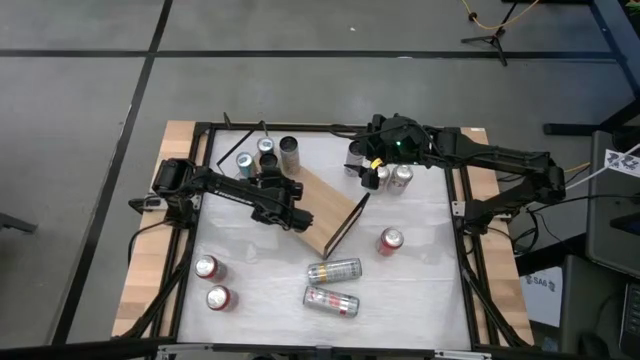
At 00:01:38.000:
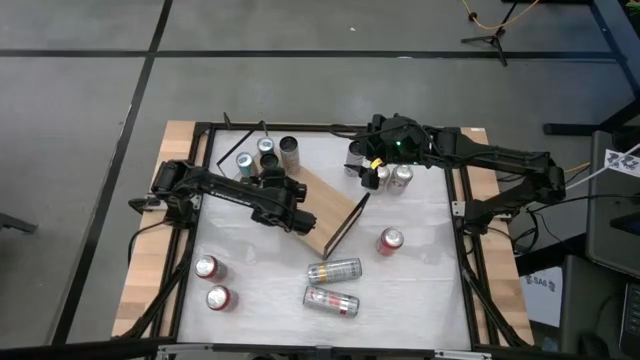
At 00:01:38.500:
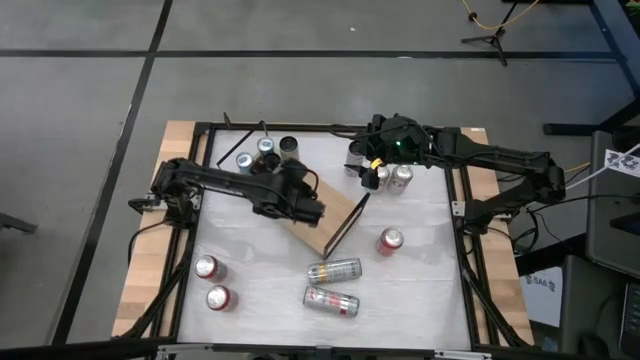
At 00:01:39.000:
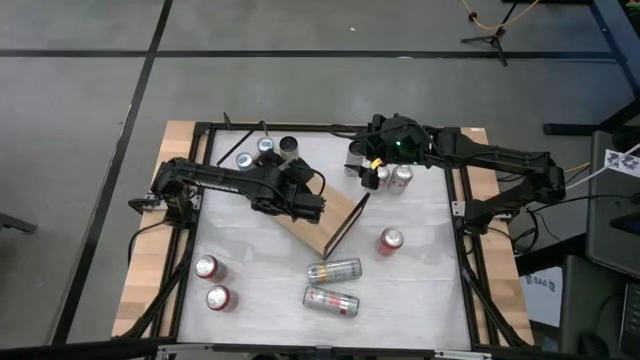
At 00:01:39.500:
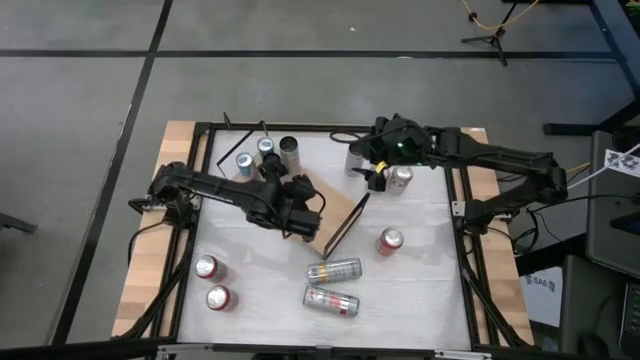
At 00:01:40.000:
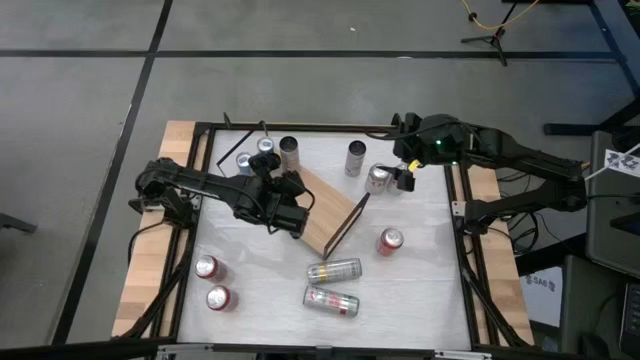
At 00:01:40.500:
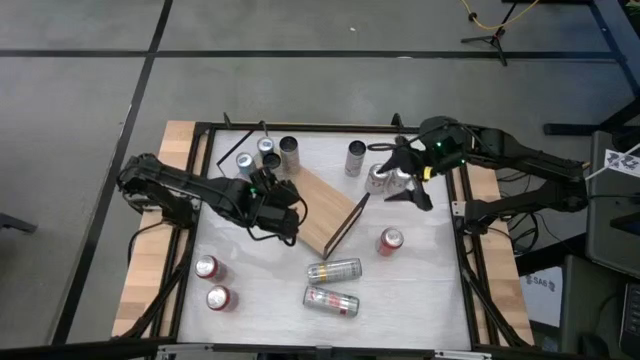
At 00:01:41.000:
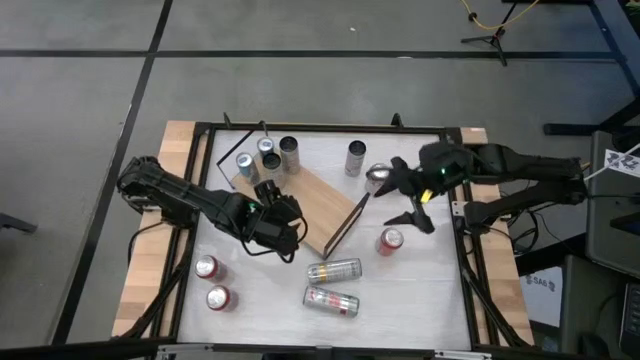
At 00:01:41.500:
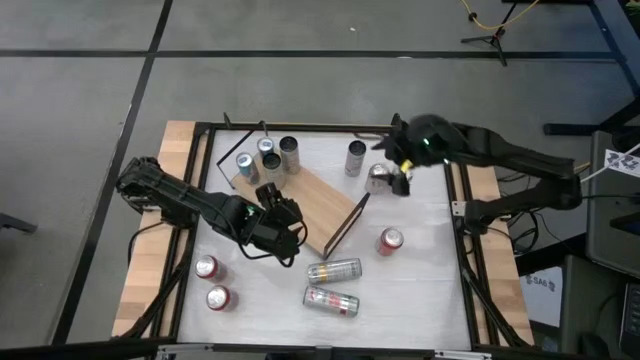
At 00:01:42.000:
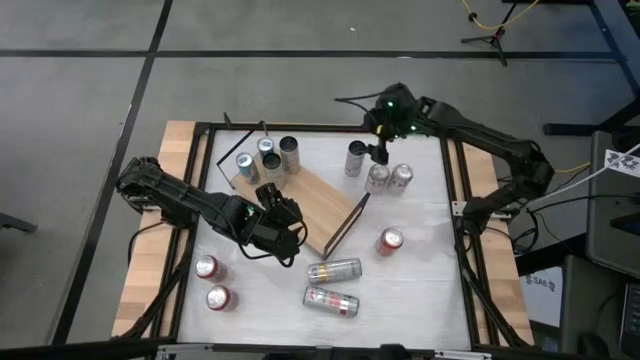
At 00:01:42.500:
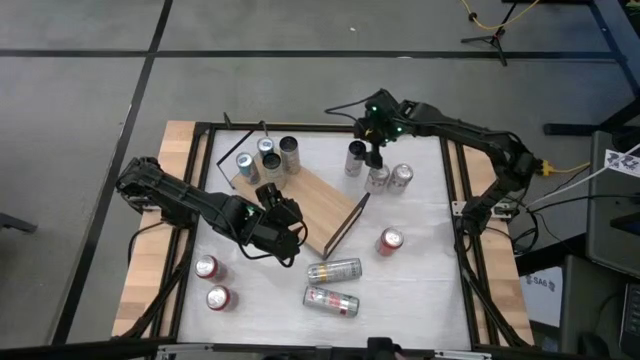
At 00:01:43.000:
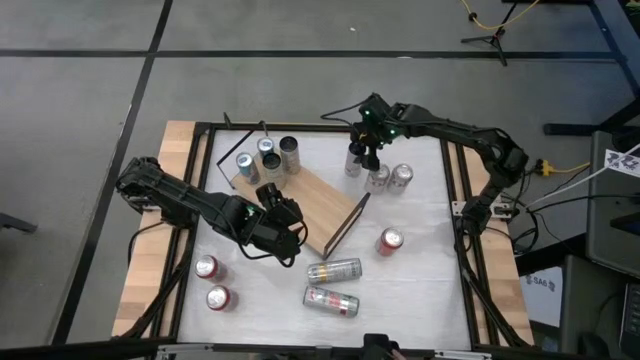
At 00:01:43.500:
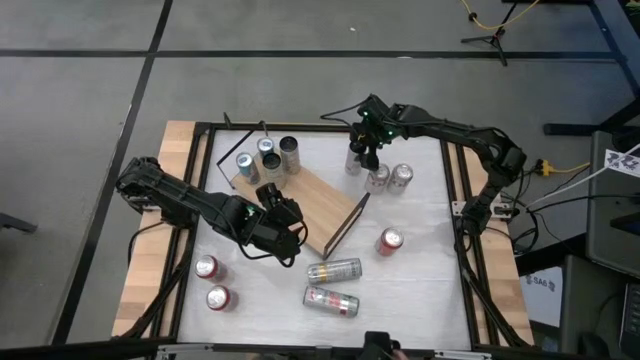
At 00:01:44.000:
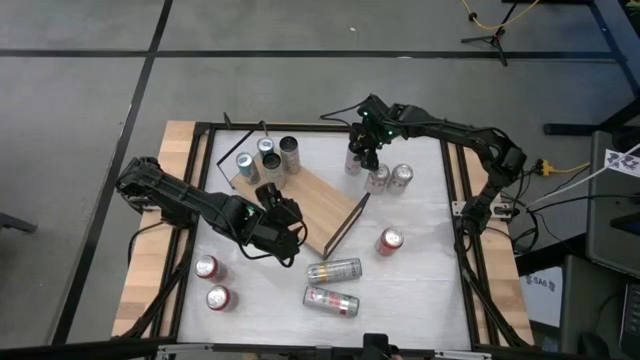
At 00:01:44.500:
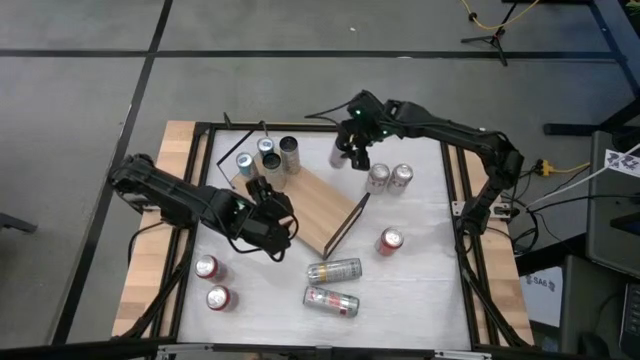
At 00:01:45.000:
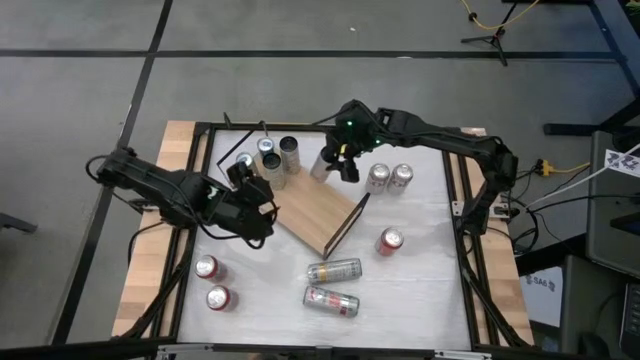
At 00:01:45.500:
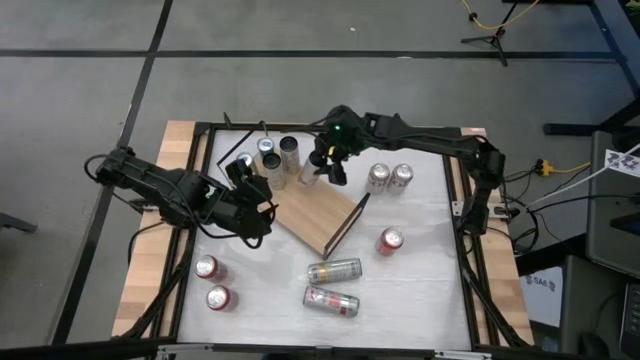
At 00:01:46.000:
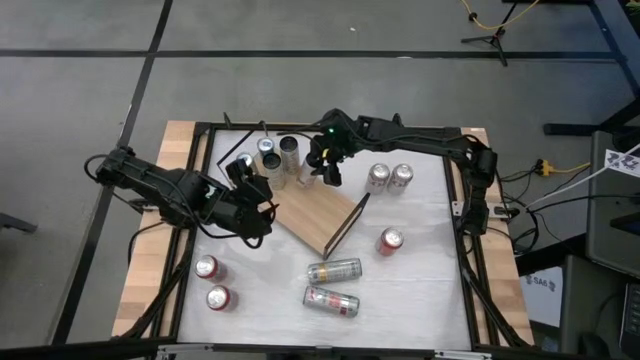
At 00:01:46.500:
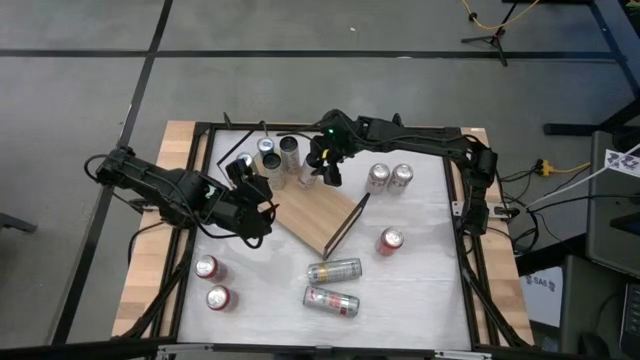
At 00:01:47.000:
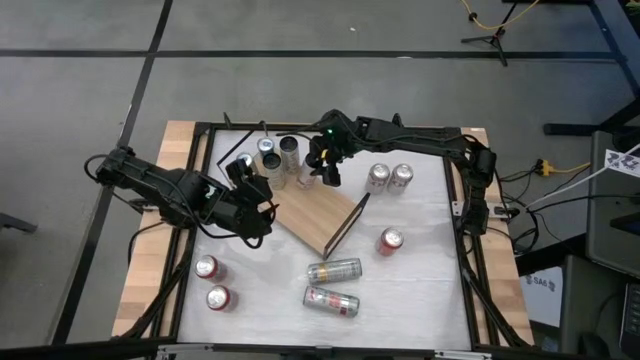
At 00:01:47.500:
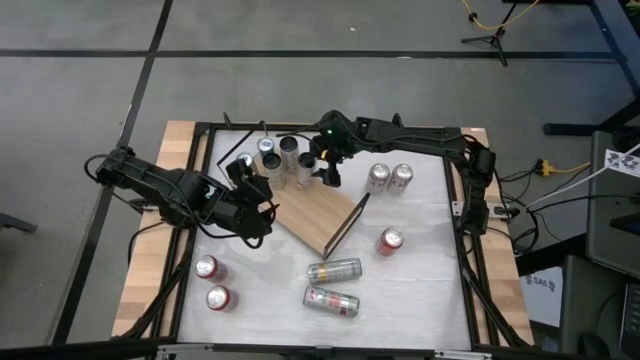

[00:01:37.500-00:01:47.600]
Task: Place canned beverage on shelf
Put the top white-pink soda can on the shelf

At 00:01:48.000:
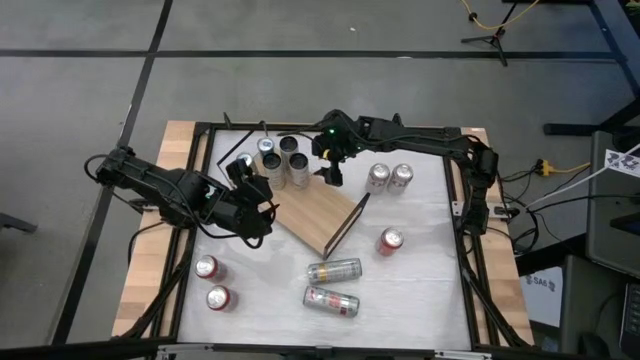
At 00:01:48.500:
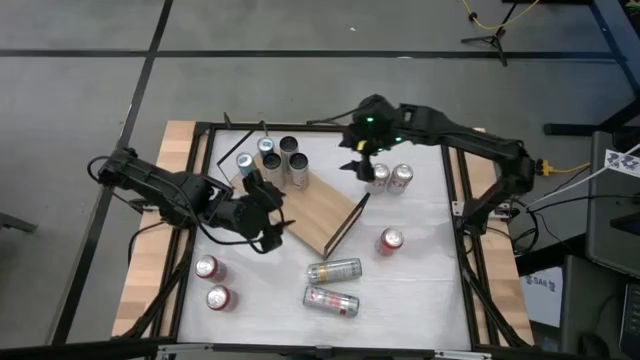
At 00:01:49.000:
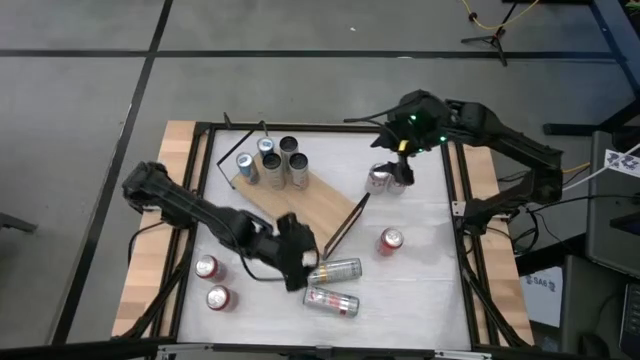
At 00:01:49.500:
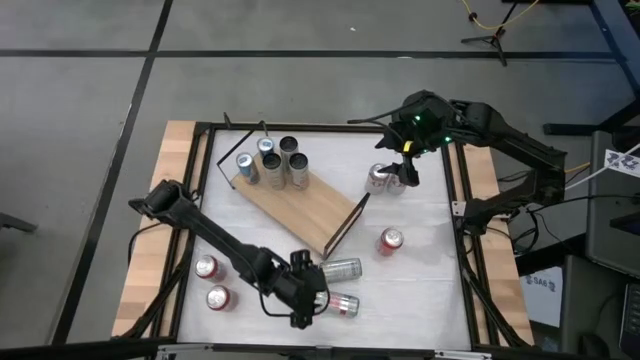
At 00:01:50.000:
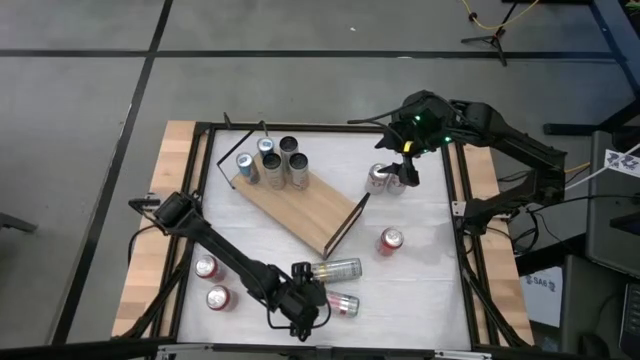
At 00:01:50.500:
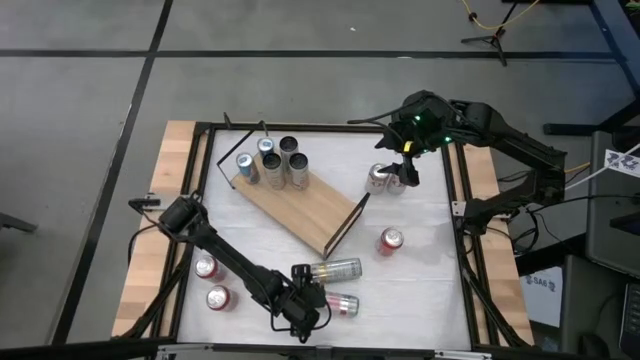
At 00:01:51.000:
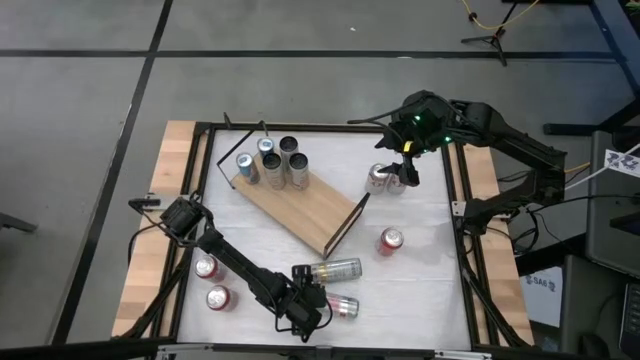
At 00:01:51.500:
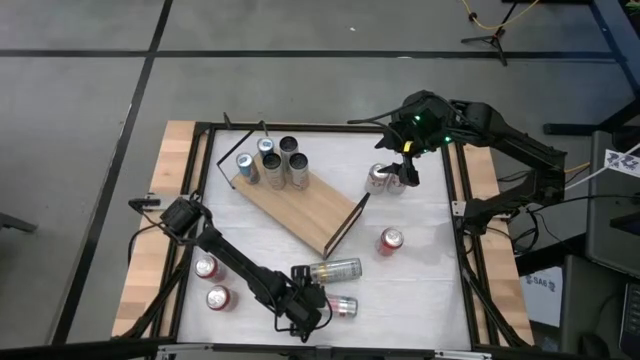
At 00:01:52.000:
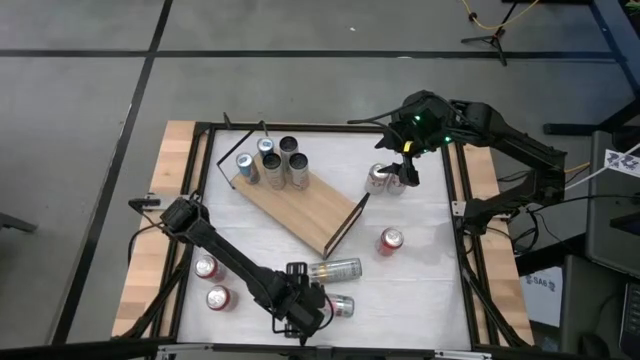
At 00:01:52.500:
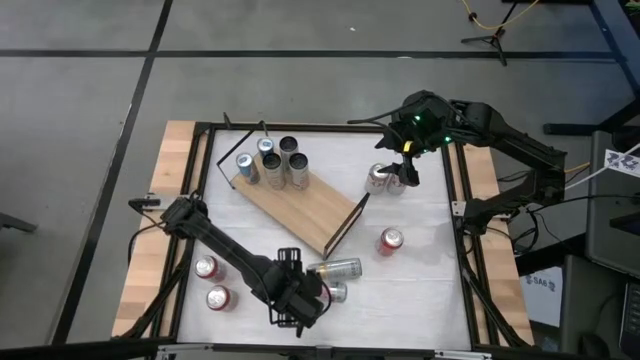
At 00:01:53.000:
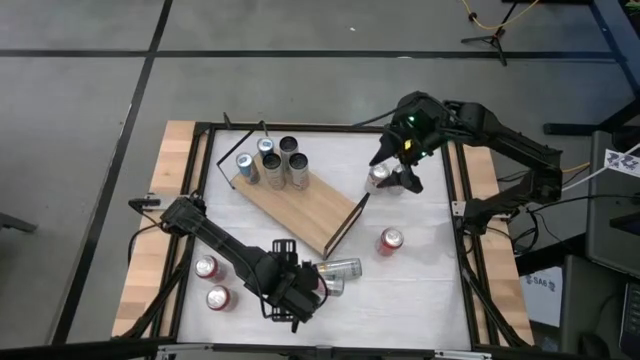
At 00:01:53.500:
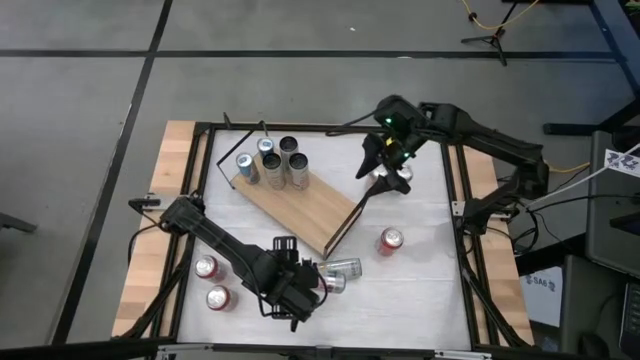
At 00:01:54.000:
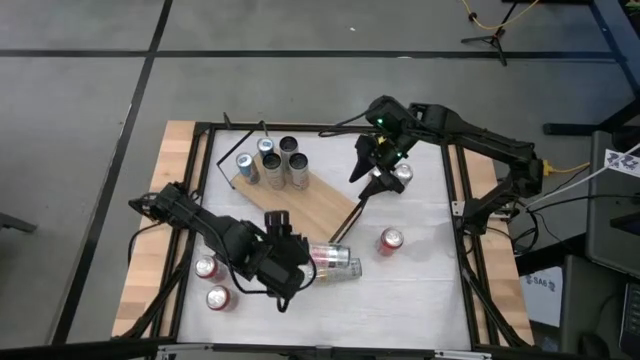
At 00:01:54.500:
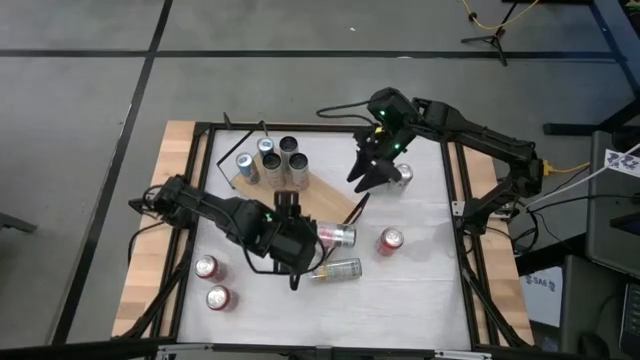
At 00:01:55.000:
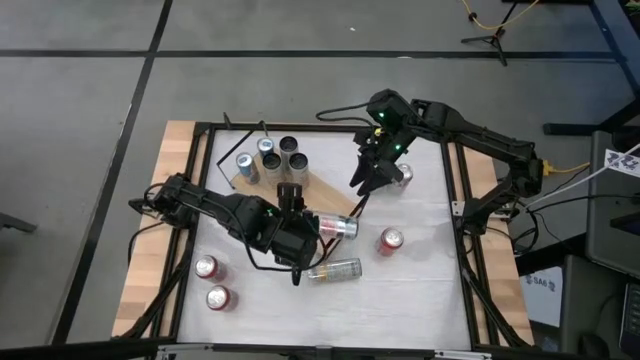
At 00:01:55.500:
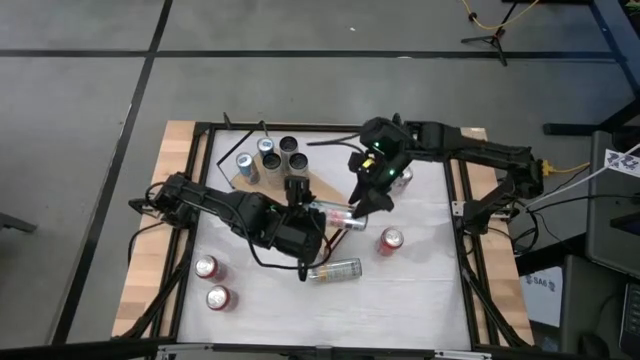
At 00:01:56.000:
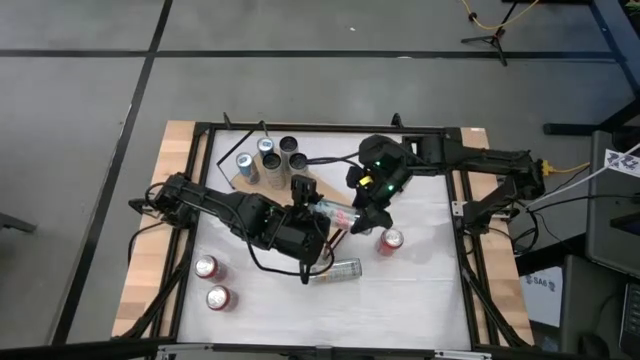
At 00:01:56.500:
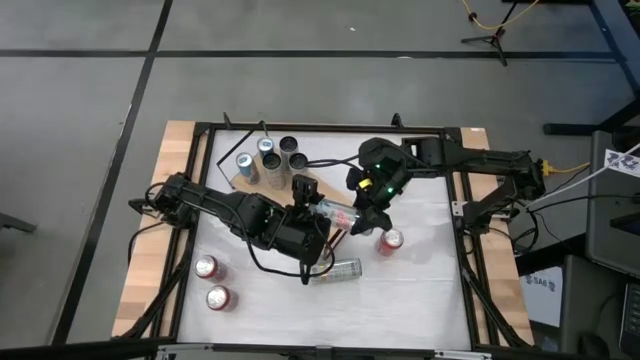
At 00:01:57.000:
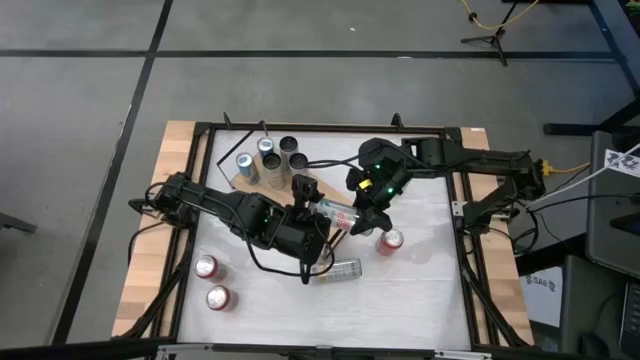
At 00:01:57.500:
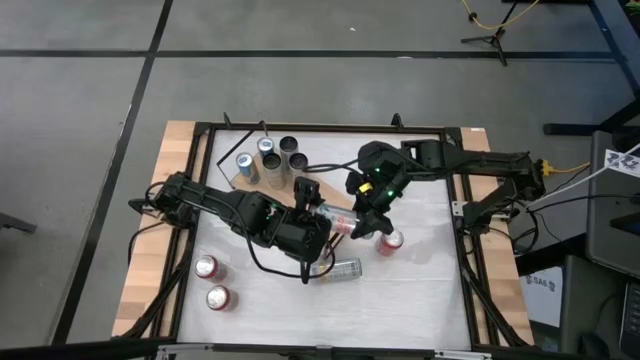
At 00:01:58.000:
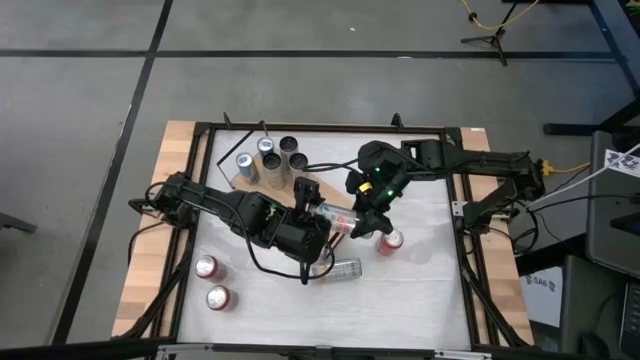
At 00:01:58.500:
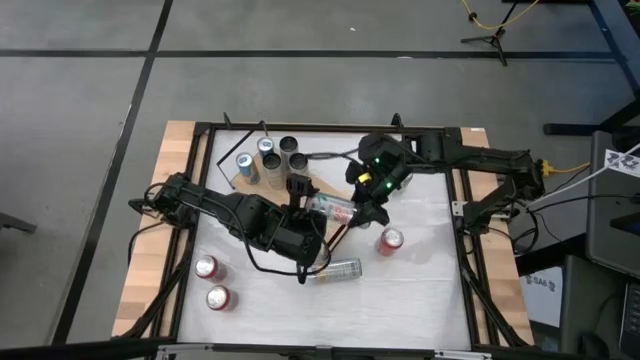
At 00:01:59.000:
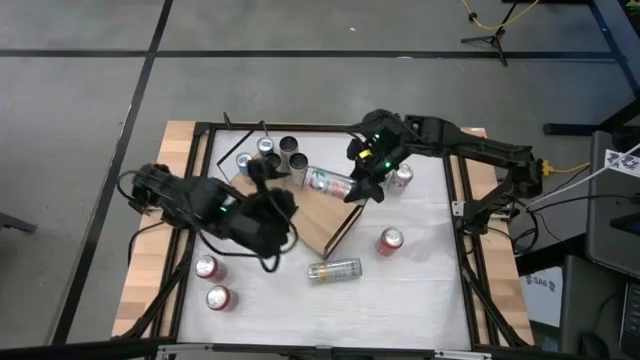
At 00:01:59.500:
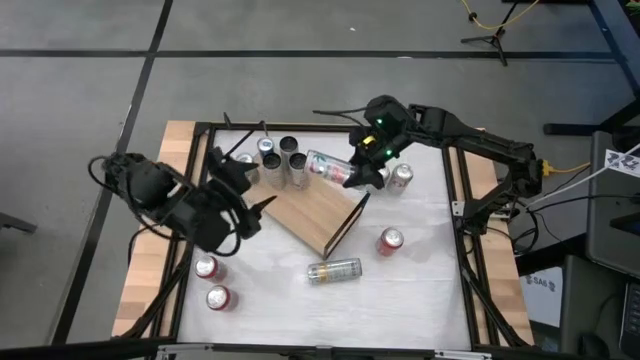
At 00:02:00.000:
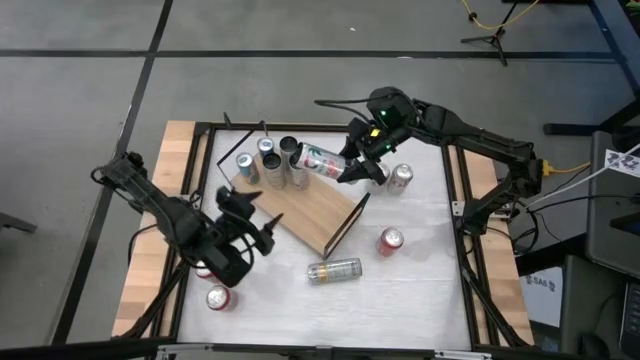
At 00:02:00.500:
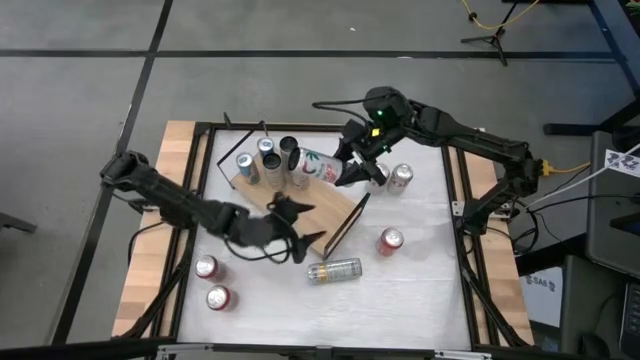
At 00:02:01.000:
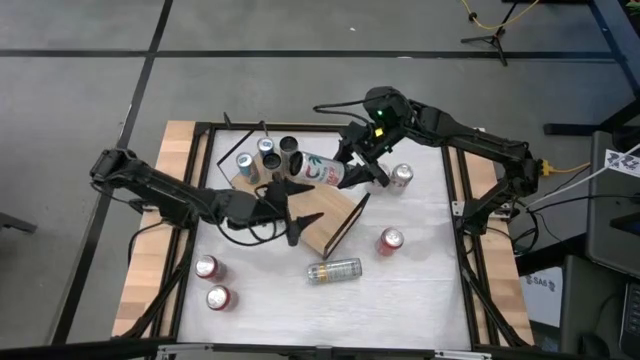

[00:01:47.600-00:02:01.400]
Put the white-pink soda can aligned with the white-pink soda can on the shelf
